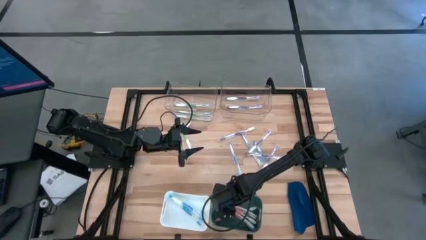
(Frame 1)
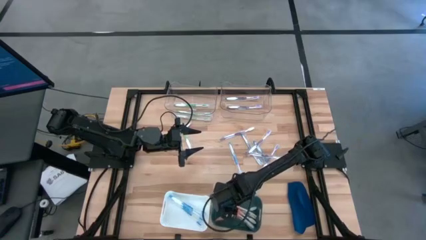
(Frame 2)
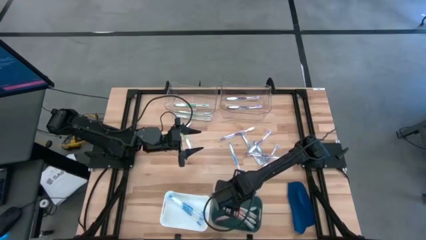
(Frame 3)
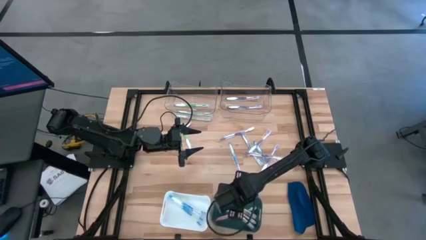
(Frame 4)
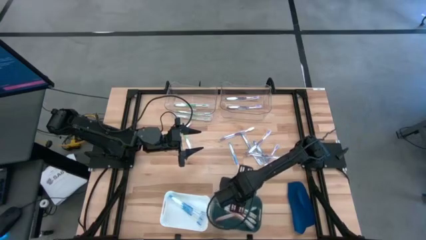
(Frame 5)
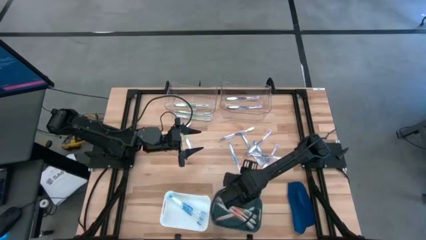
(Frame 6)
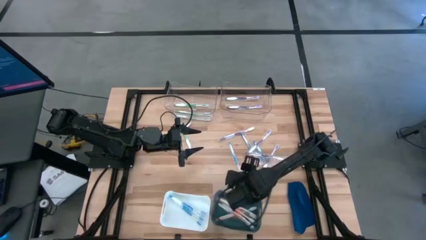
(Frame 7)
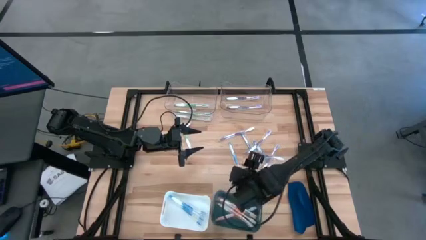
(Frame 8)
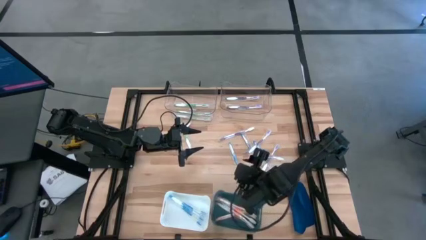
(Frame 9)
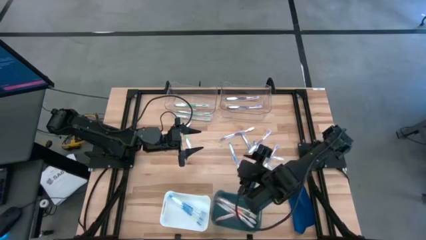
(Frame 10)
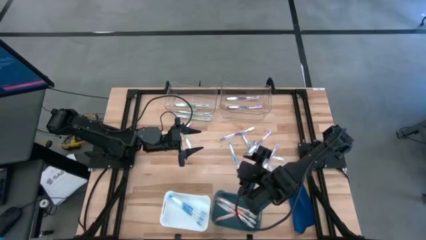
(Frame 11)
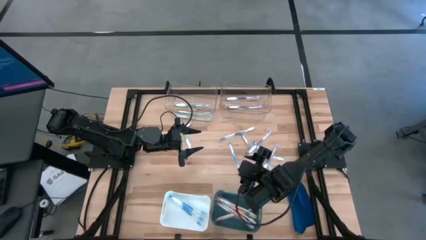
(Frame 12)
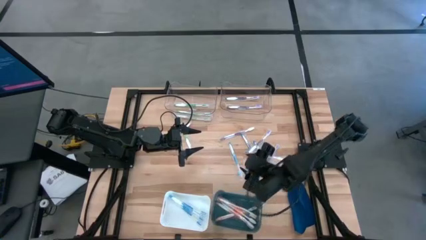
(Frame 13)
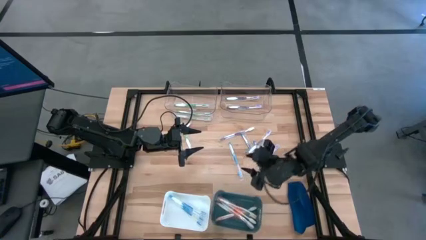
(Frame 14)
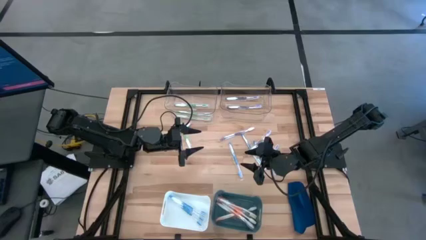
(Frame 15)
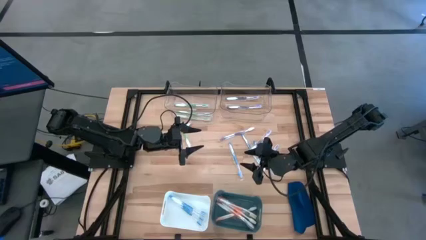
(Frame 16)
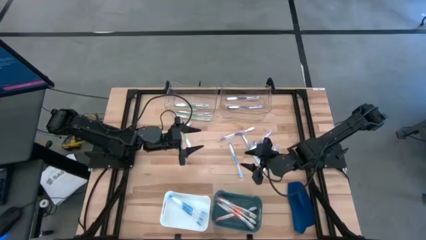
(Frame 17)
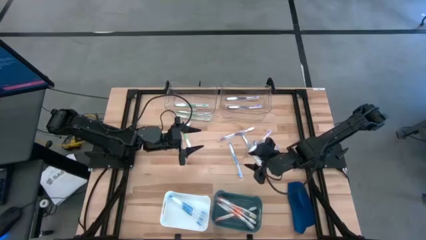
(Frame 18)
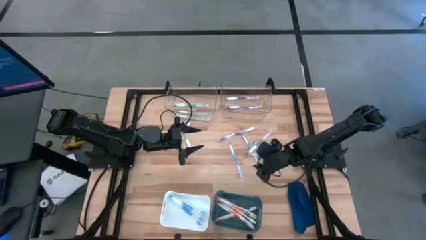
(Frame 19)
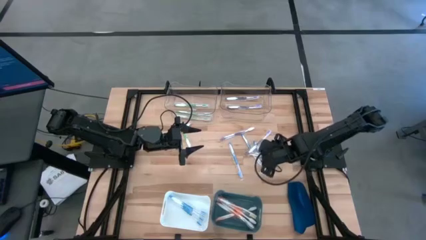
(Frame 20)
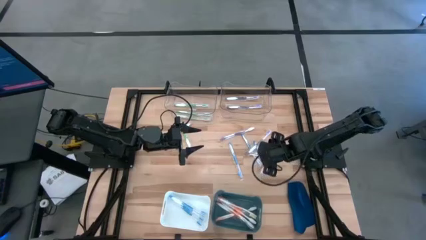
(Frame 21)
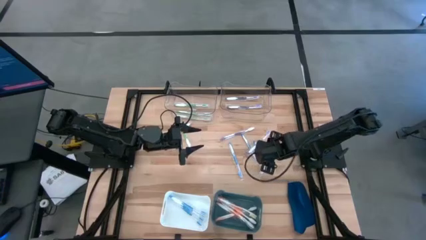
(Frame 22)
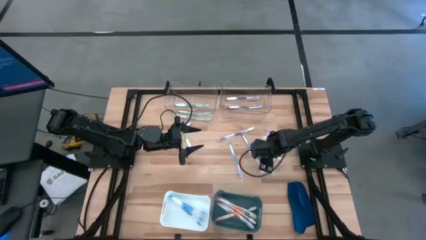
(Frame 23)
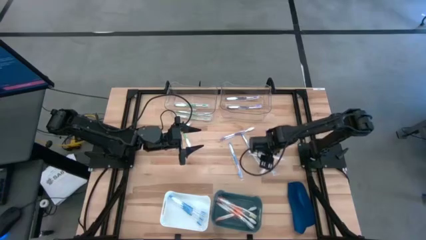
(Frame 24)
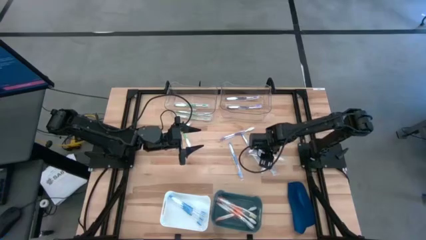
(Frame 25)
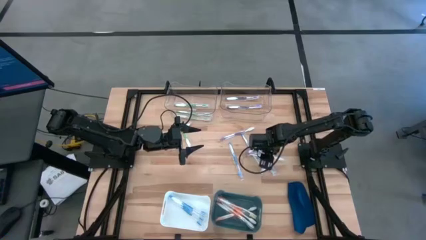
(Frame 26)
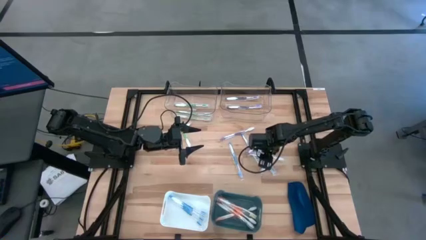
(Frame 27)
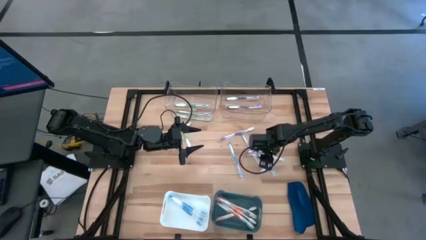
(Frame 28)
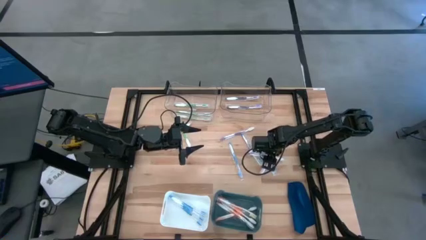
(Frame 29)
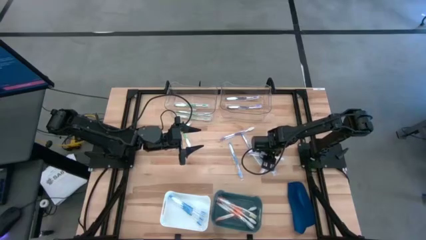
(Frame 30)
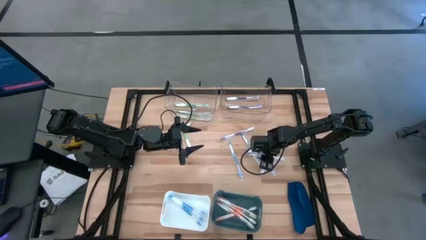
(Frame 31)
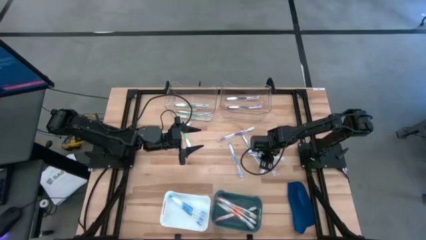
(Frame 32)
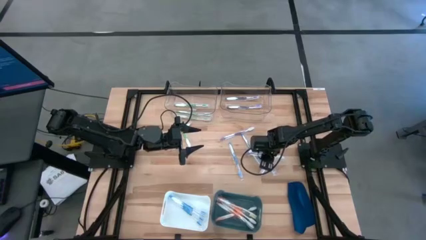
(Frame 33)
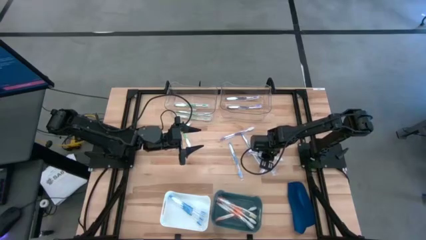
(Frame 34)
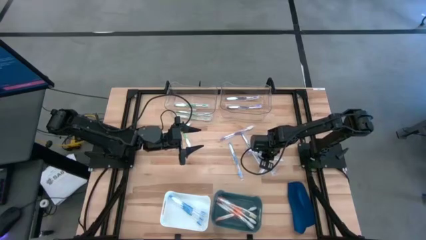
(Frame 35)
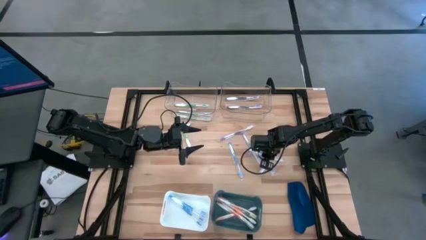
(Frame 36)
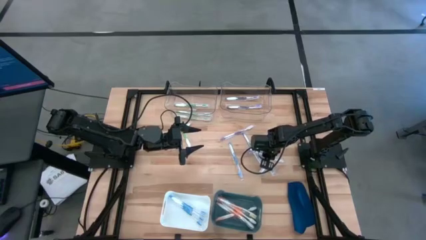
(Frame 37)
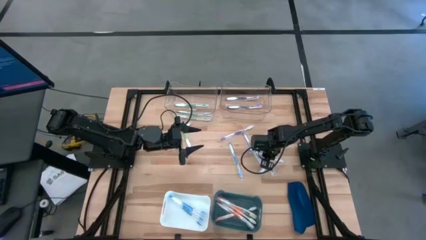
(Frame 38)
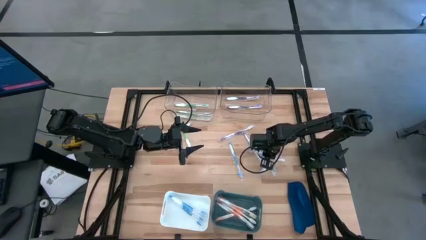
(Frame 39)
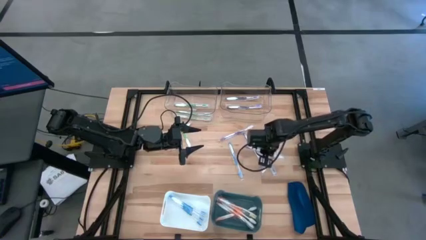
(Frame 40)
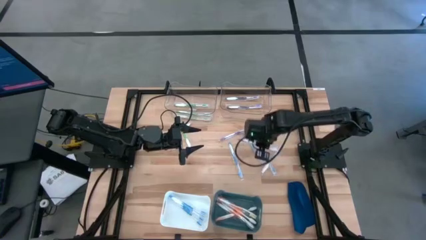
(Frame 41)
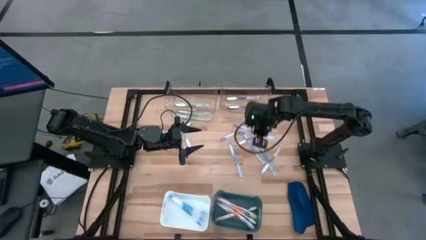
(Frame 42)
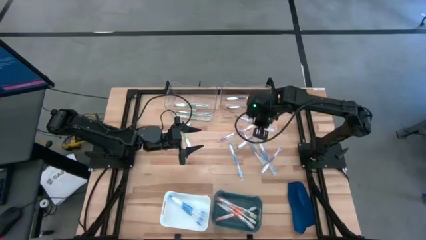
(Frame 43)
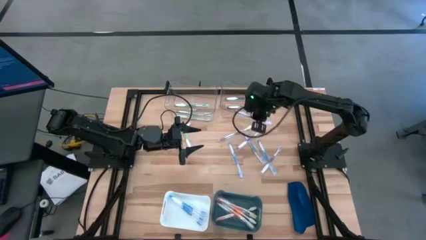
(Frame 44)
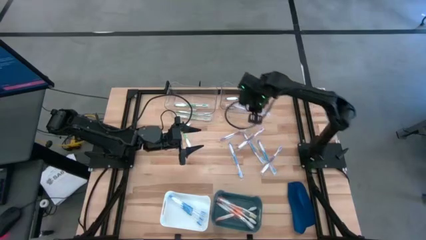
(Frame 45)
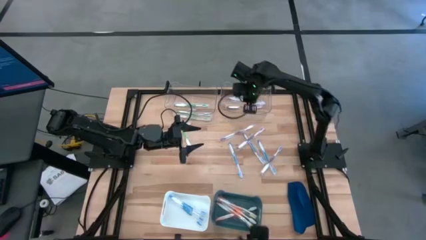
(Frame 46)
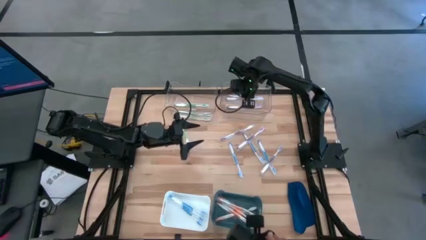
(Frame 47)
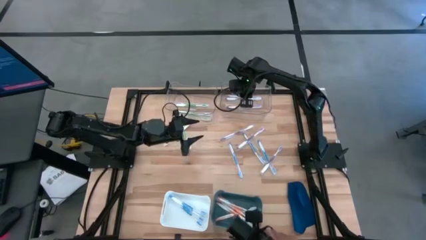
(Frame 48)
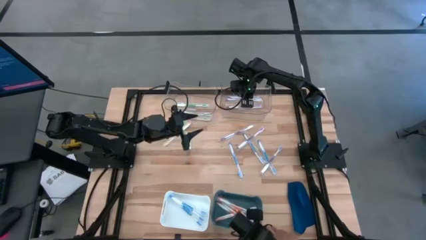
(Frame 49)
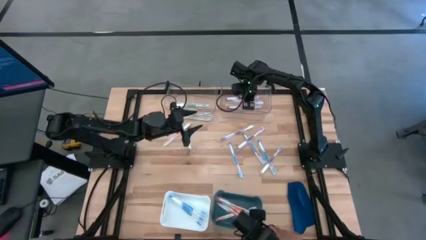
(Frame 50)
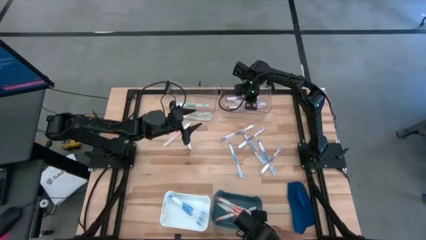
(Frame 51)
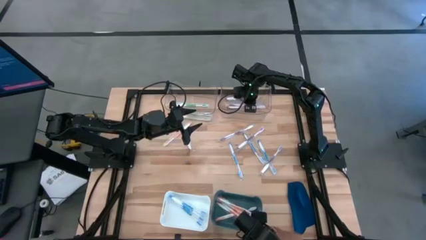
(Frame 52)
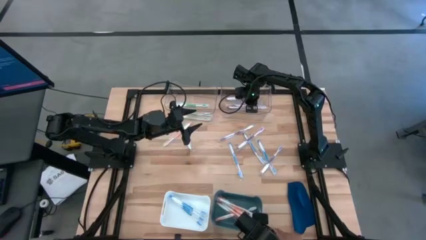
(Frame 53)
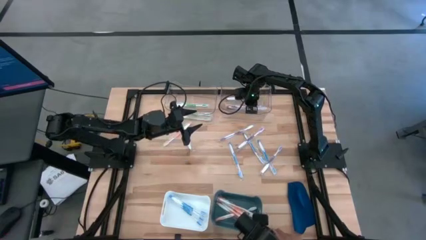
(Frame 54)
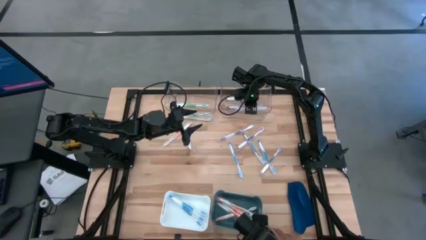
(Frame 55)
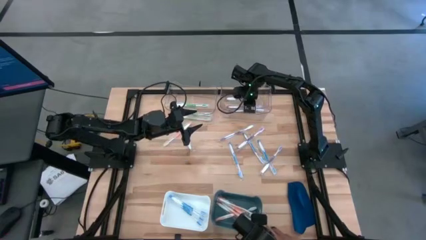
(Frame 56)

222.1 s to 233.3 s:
Task: Pick & Place Toothbrushes
Put the purple toothbrush into the right transparent bin

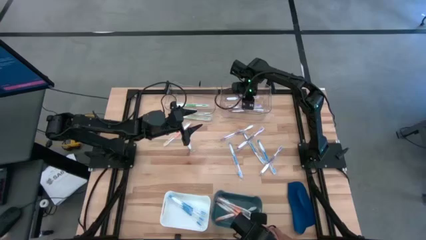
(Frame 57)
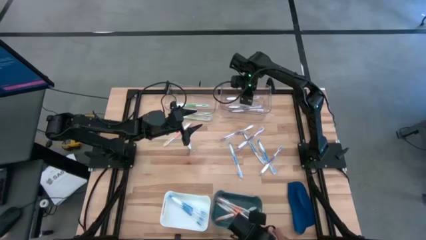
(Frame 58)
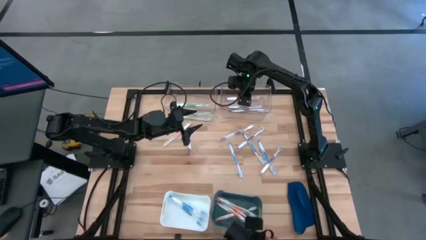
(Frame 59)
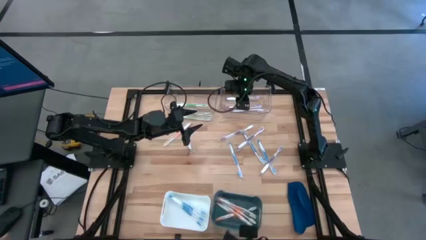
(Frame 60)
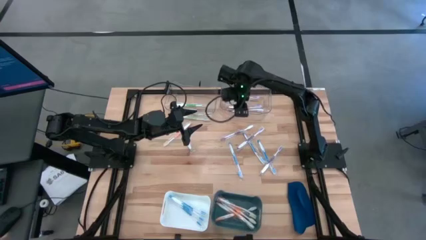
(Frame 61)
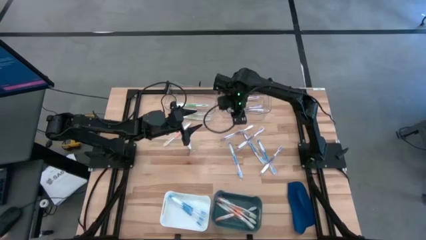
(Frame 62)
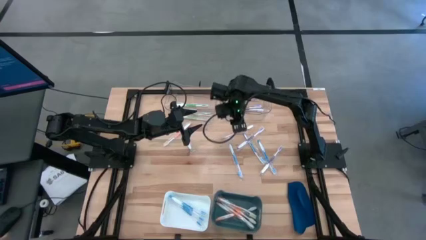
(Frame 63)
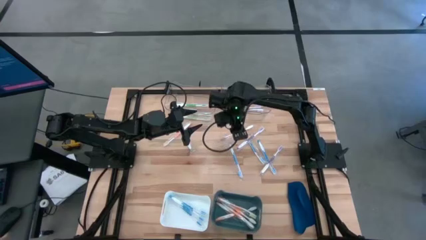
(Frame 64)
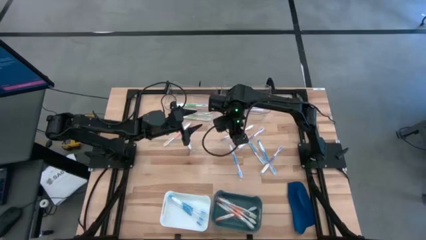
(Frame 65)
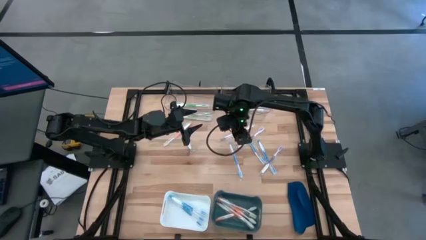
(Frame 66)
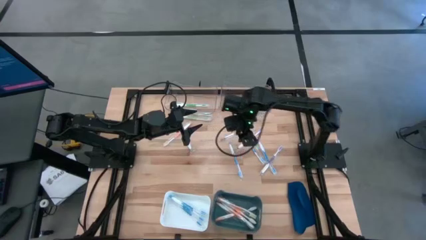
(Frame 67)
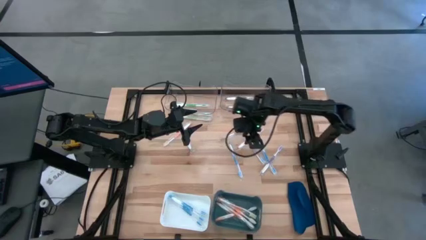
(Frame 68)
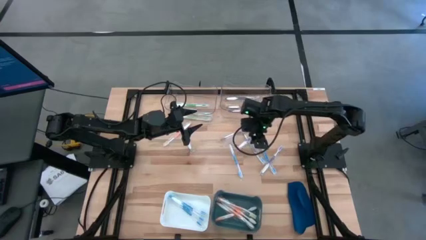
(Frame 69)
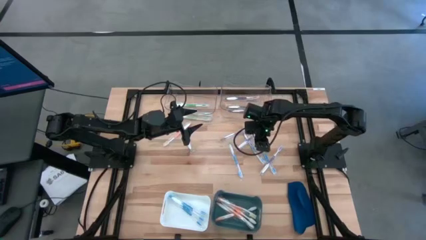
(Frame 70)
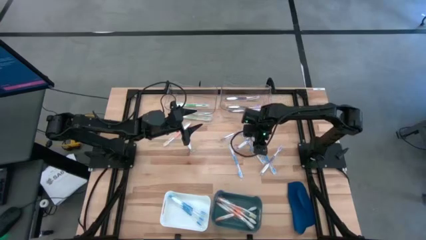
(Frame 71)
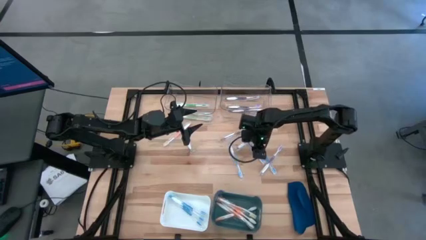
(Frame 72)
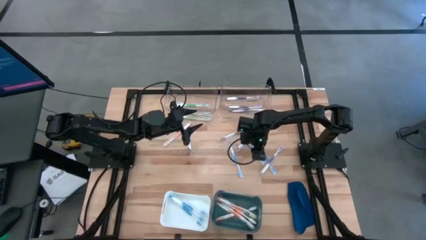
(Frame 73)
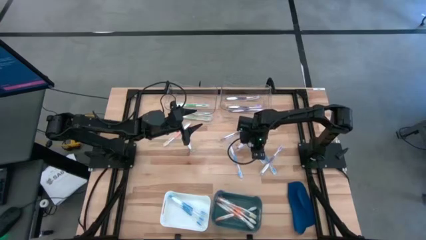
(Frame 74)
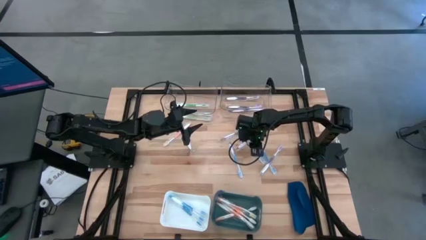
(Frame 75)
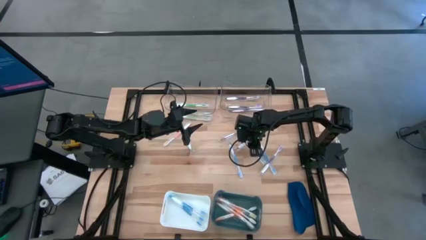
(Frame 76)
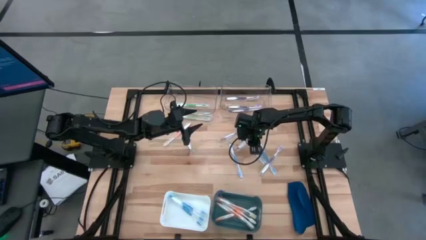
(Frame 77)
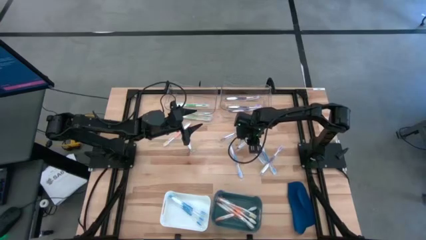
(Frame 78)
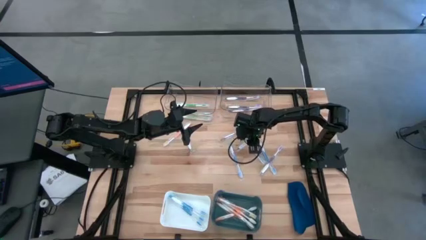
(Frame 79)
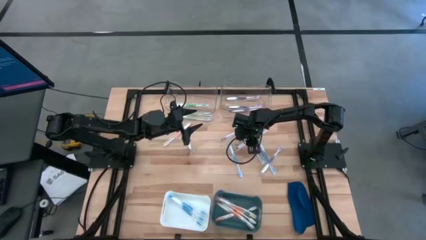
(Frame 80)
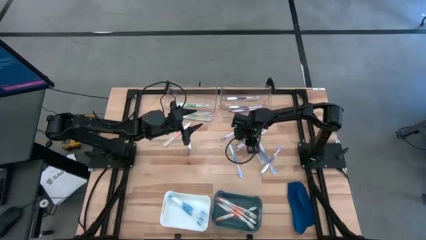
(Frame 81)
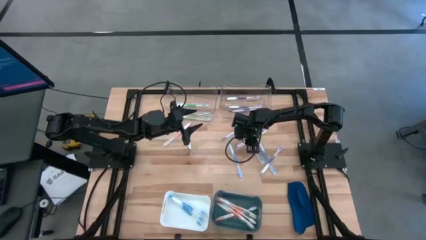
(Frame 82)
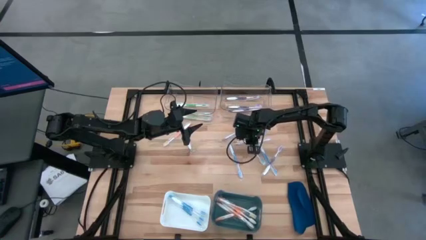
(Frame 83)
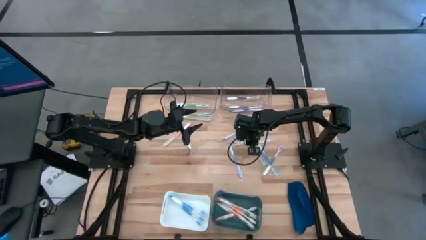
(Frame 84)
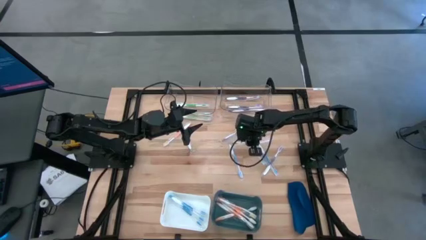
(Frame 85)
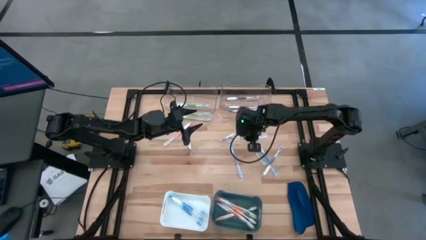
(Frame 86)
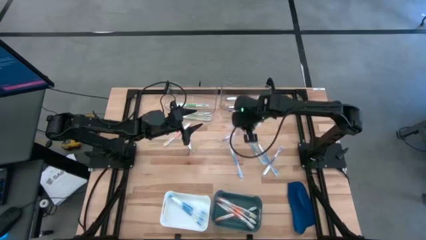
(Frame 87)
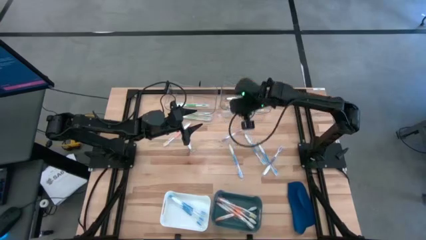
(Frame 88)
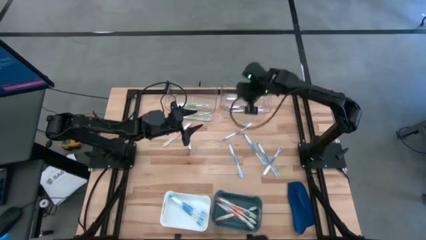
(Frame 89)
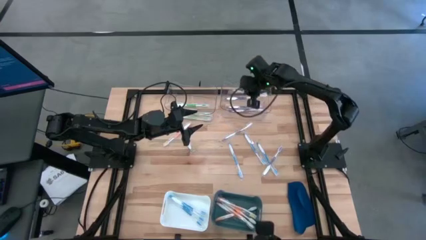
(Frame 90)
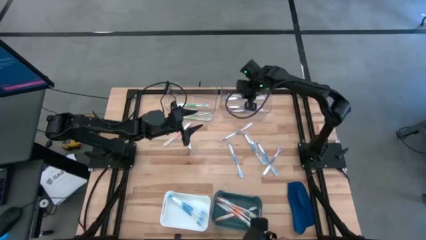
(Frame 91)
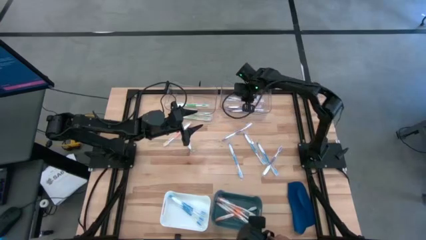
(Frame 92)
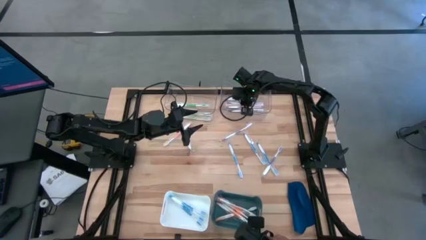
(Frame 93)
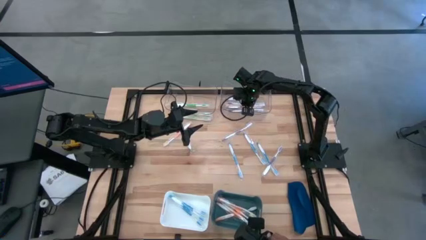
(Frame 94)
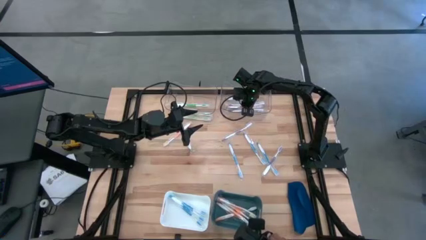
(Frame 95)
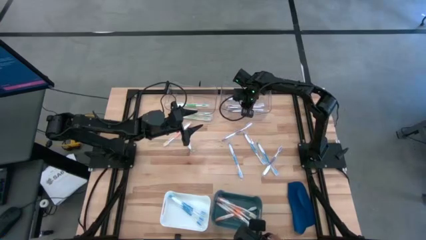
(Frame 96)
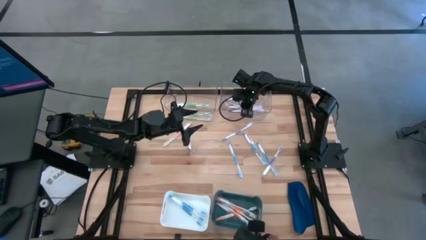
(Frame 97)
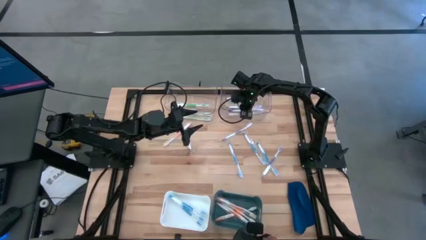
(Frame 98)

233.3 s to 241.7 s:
Put the purple toothbrush into the right transparent bin
